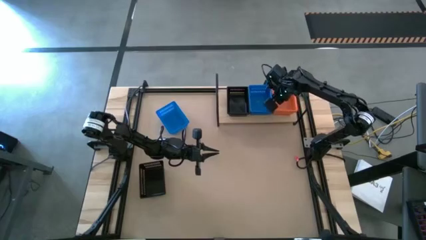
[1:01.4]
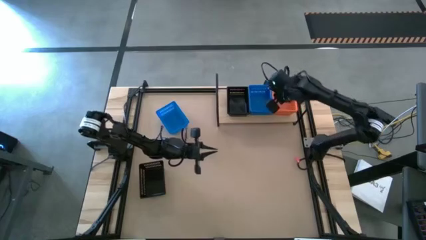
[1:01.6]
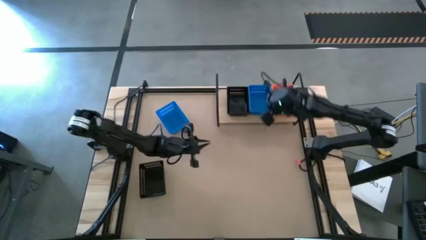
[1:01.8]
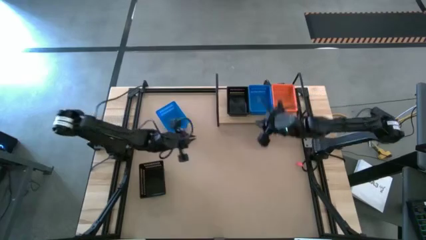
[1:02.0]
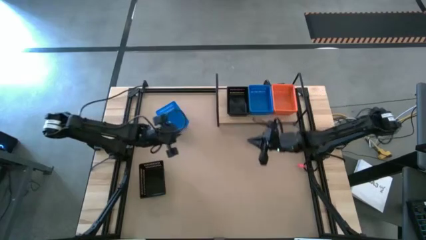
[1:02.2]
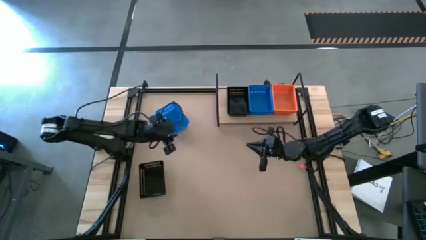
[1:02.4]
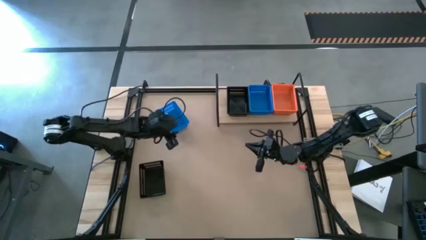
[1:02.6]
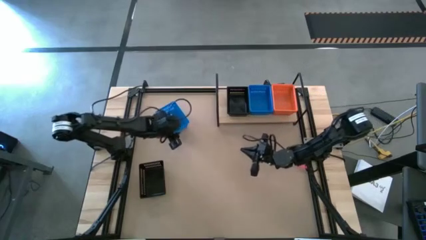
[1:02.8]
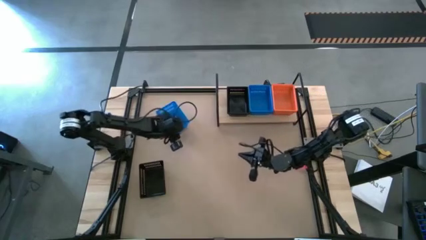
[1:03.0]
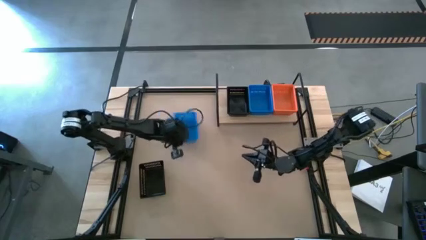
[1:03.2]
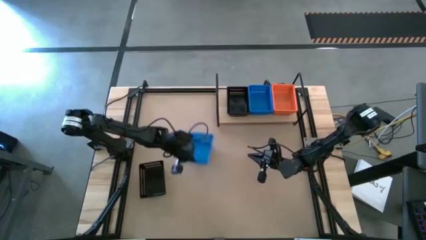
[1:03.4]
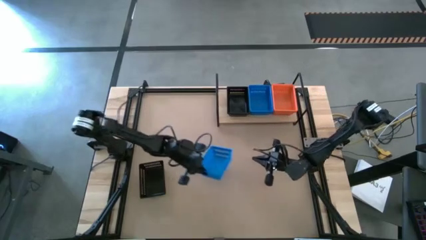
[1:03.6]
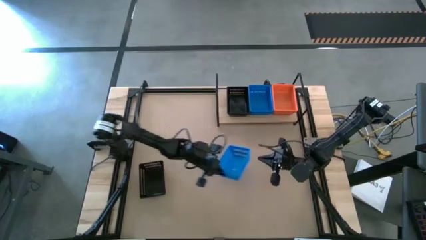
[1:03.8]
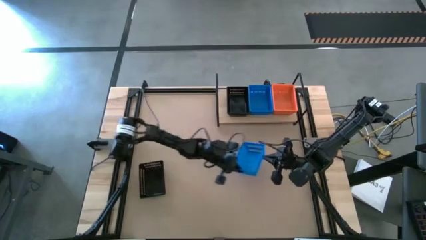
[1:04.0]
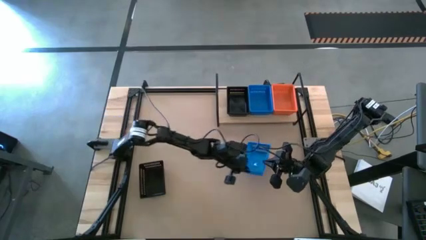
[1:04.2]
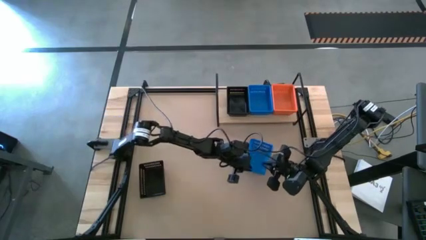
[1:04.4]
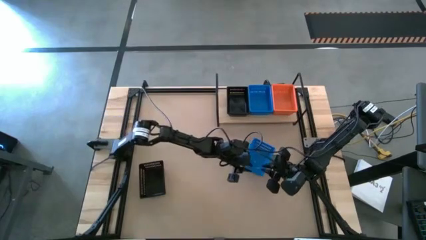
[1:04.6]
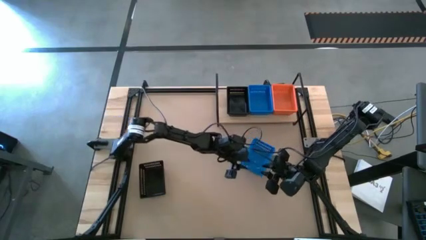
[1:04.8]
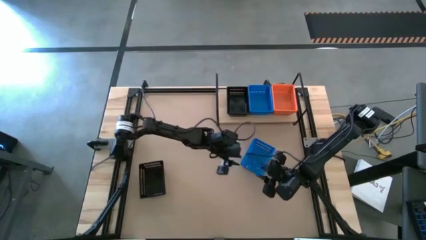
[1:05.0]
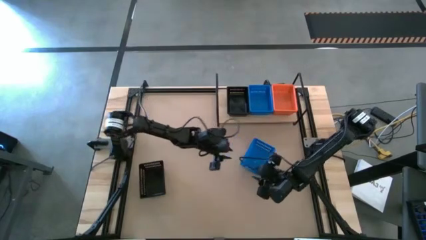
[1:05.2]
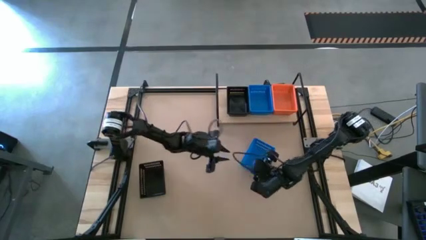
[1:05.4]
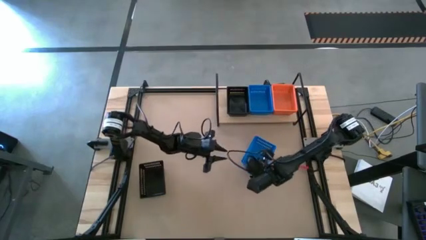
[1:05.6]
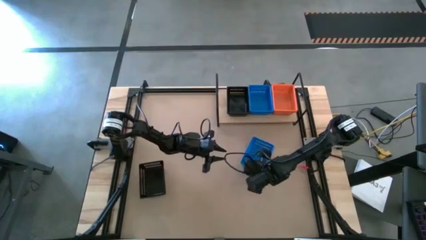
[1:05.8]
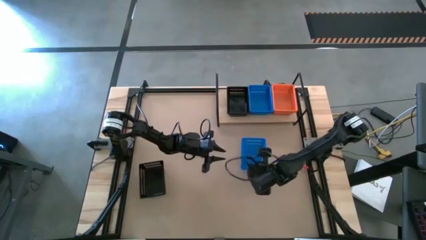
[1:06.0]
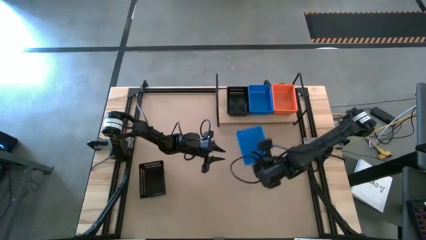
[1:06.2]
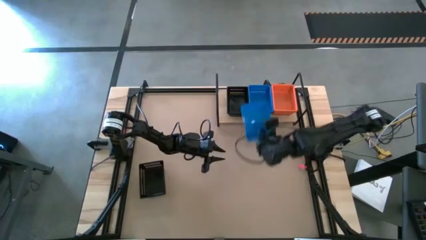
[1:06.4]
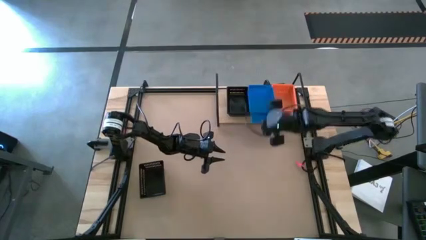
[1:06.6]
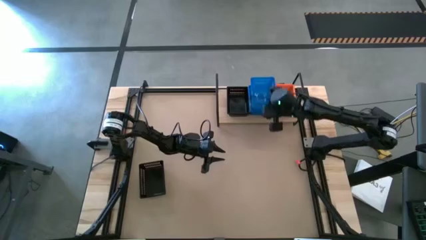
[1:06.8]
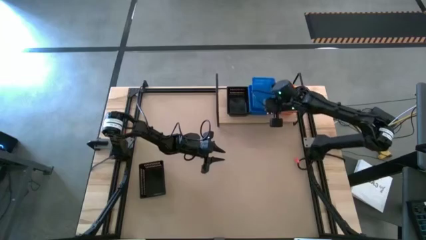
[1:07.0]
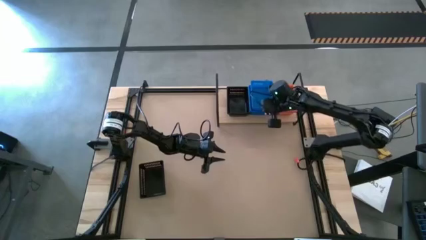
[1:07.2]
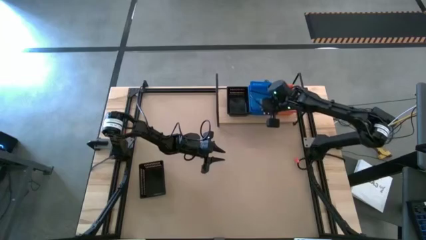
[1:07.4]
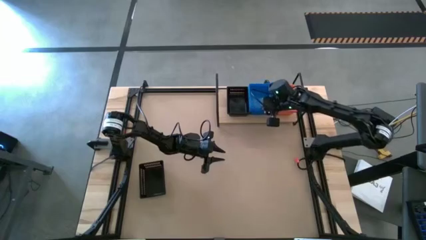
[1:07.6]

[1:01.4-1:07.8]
Task: Stack baskets on shelf by color
Stack the blue bin on top of the other blue bins on the shelf

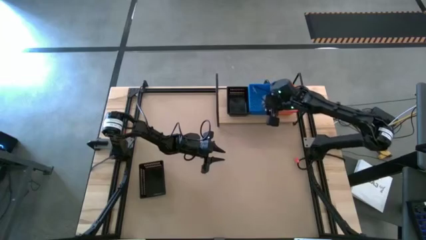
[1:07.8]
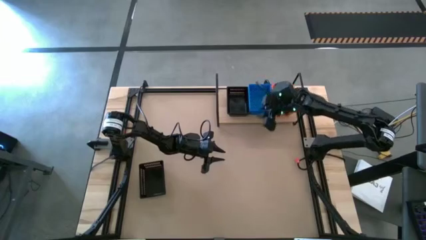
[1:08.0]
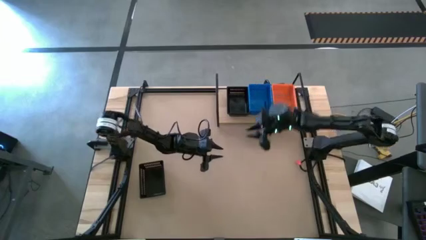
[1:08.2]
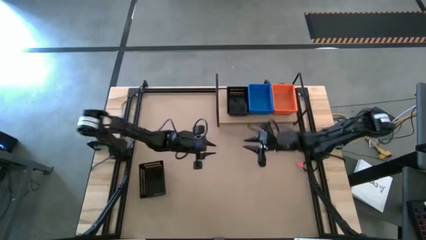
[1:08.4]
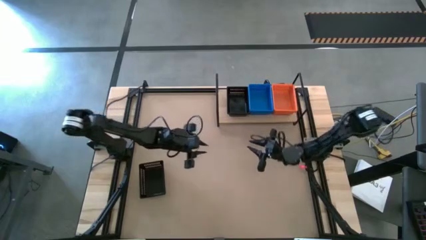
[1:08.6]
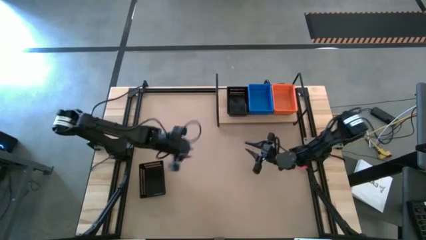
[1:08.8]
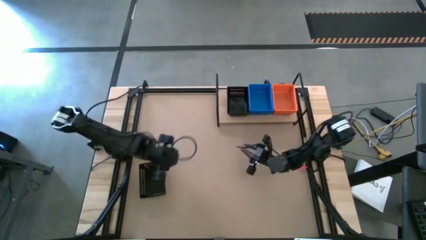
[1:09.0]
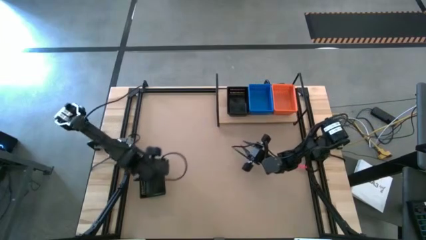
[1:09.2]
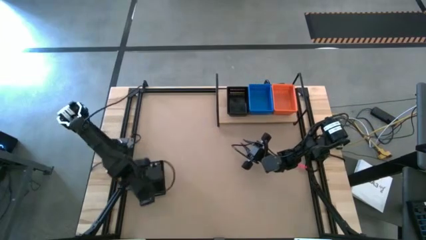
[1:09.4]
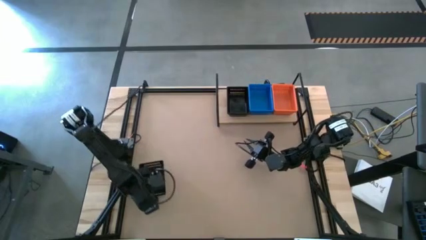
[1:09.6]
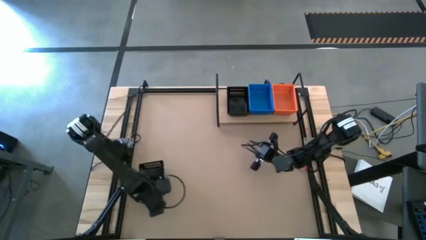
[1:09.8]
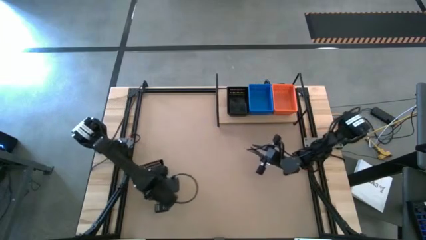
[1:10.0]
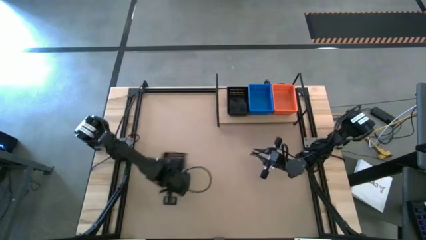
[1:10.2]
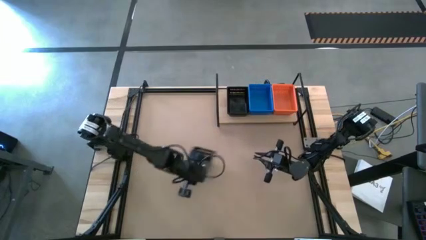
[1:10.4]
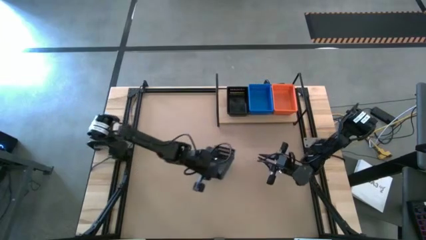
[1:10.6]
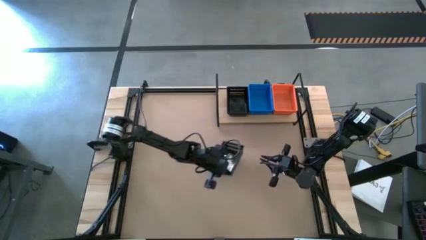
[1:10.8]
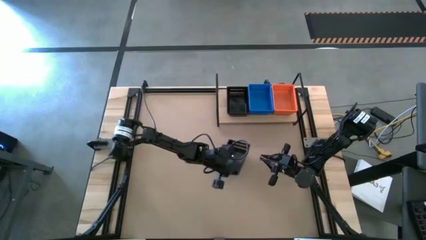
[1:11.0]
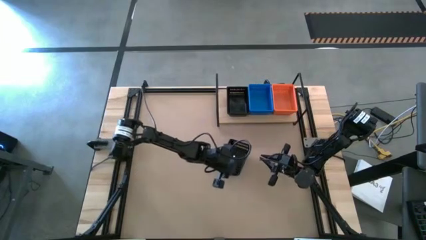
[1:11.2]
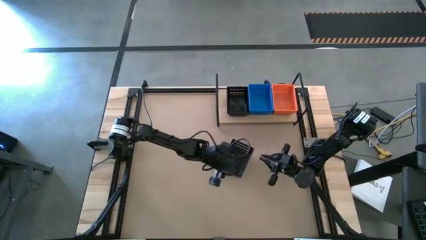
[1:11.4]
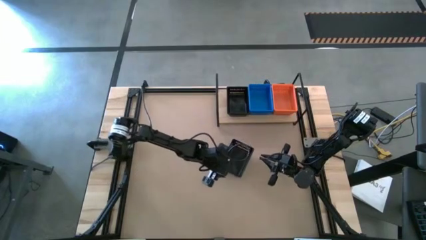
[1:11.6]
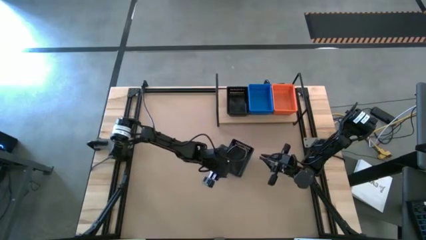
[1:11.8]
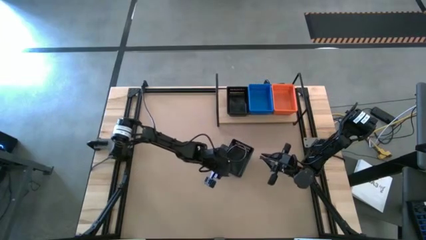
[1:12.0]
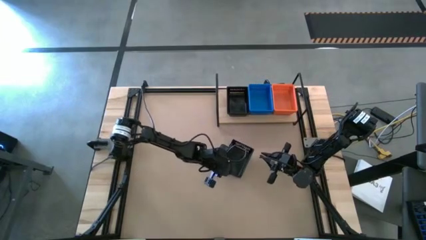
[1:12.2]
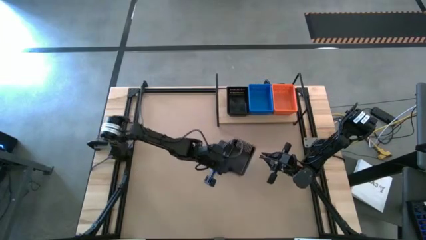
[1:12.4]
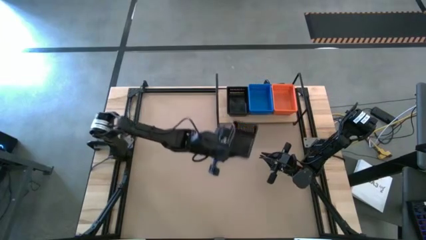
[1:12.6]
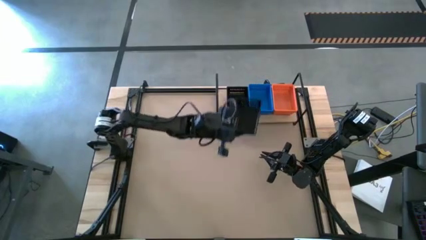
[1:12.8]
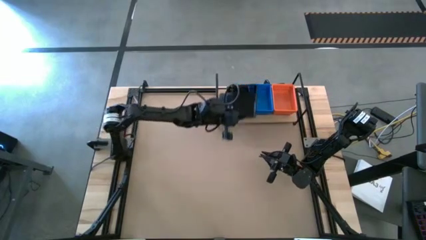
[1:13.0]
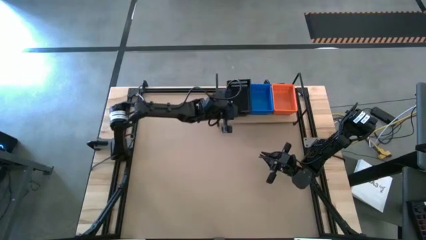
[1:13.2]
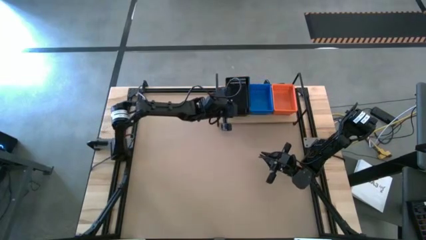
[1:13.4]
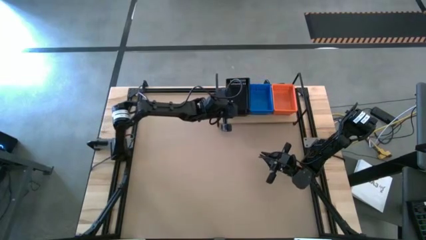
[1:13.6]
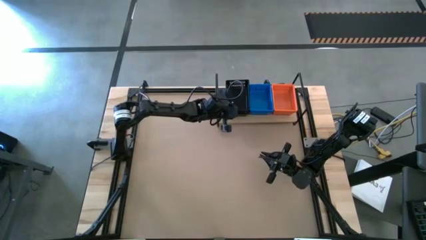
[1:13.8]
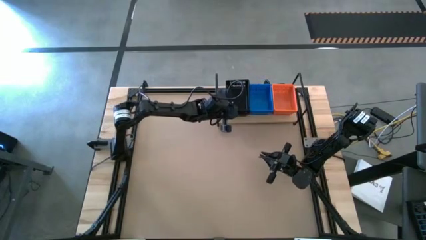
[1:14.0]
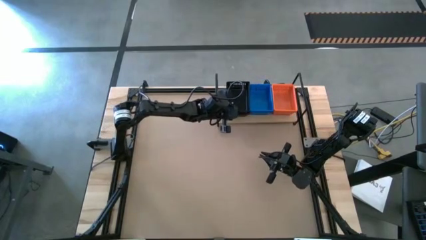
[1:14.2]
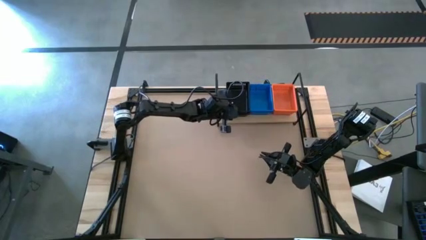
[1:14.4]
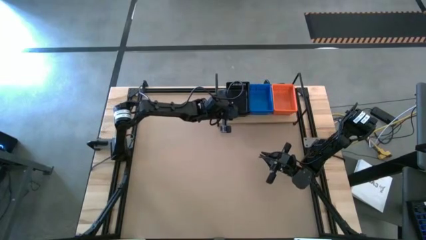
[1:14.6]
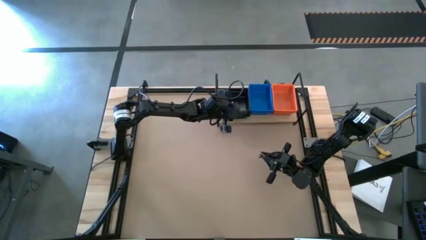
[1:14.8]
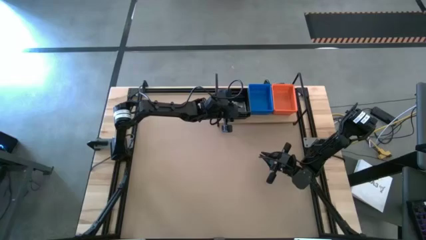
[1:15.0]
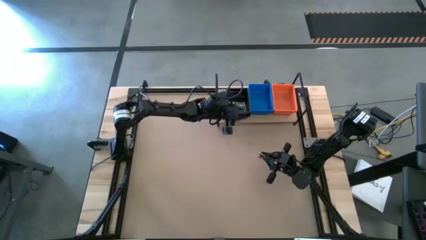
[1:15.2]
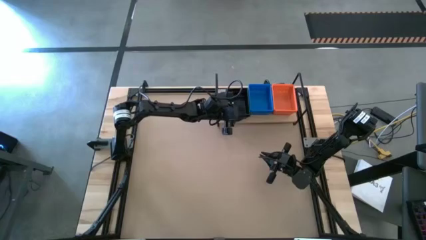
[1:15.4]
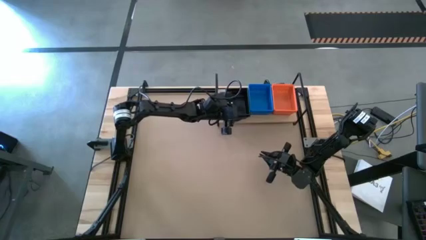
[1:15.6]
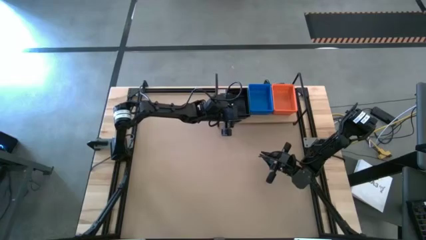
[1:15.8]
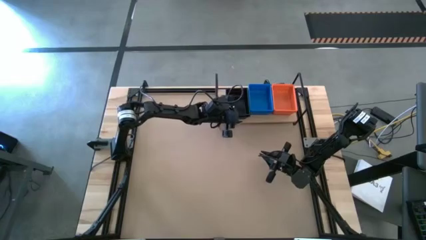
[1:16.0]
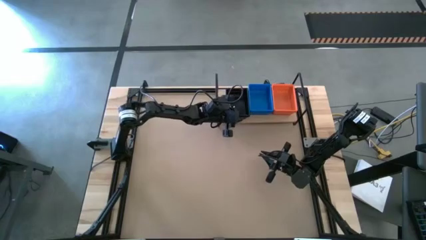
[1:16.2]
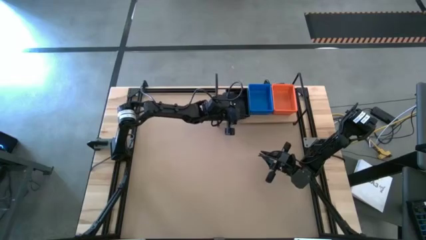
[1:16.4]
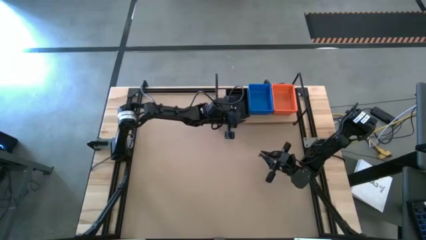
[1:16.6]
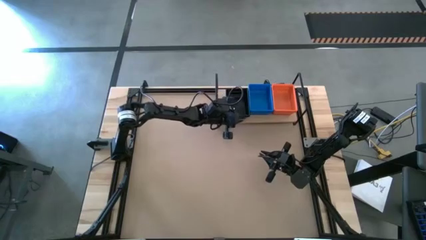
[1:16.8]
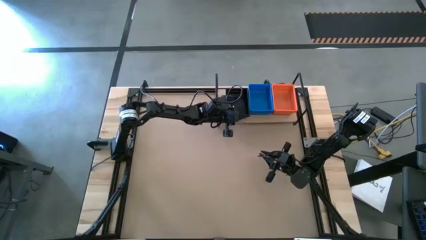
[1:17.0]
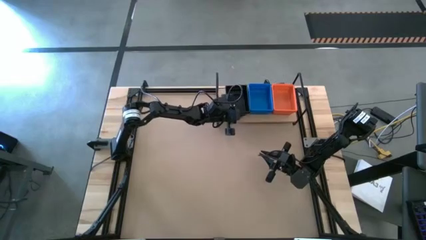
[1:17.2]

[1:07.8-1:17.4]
Stack the black bin on top of the other black bins on the shelf
